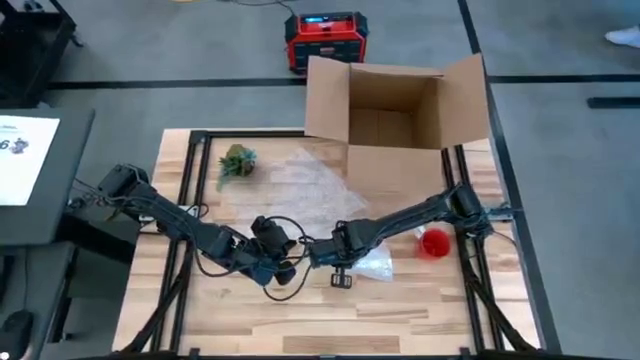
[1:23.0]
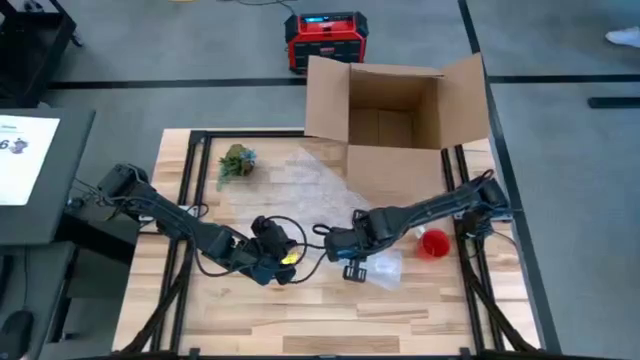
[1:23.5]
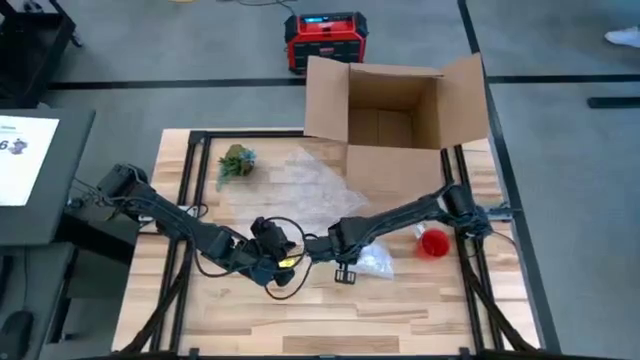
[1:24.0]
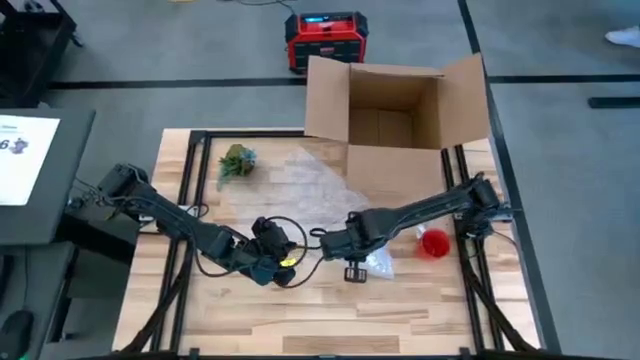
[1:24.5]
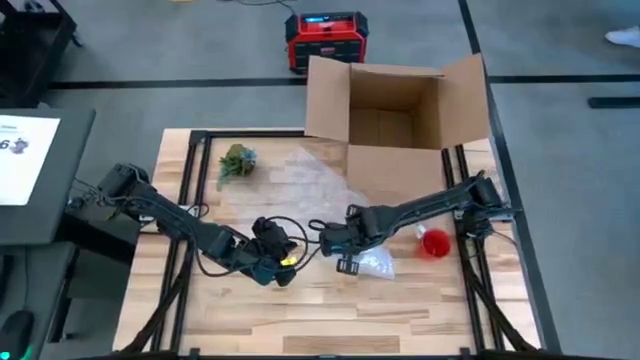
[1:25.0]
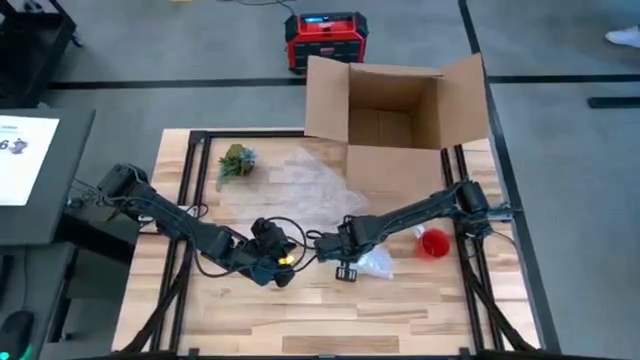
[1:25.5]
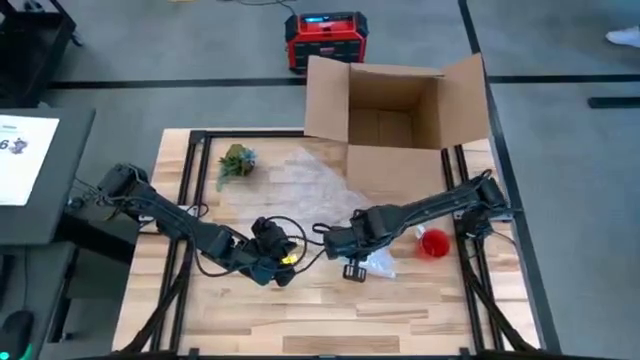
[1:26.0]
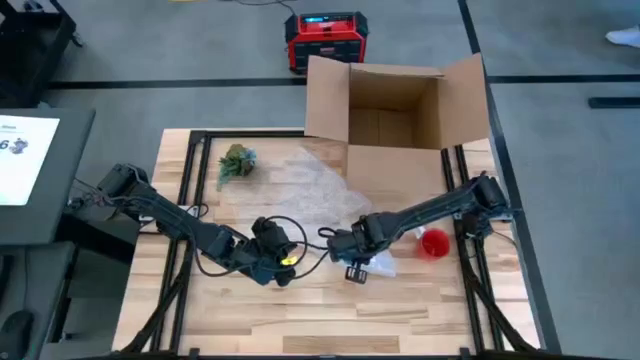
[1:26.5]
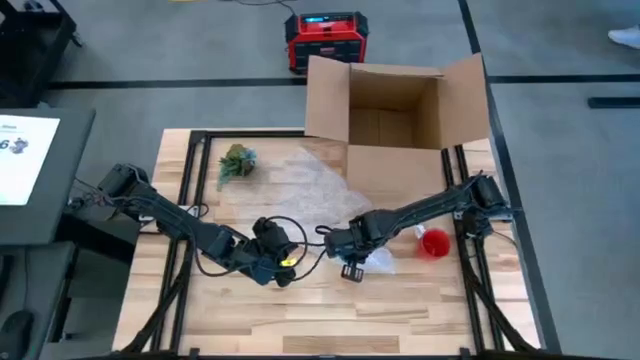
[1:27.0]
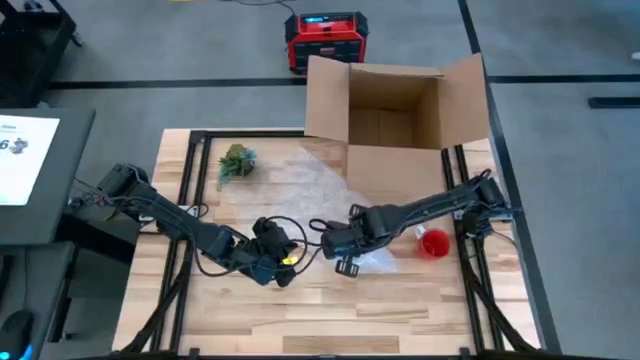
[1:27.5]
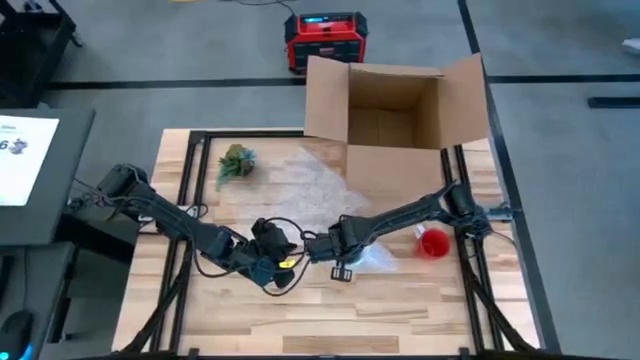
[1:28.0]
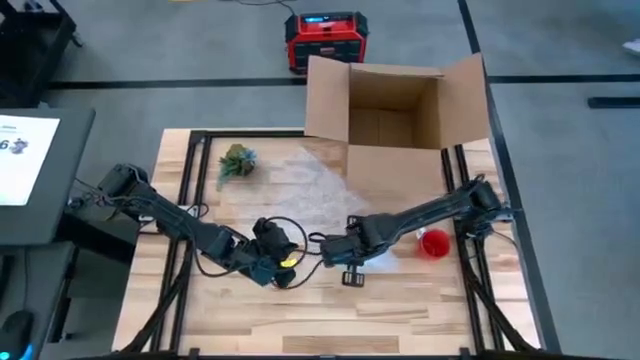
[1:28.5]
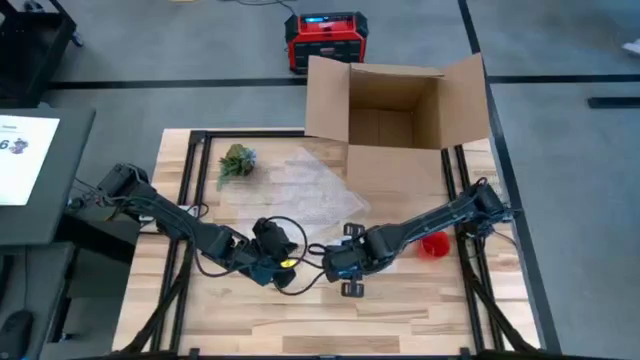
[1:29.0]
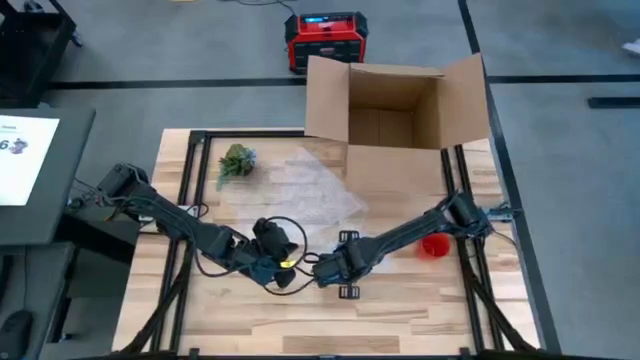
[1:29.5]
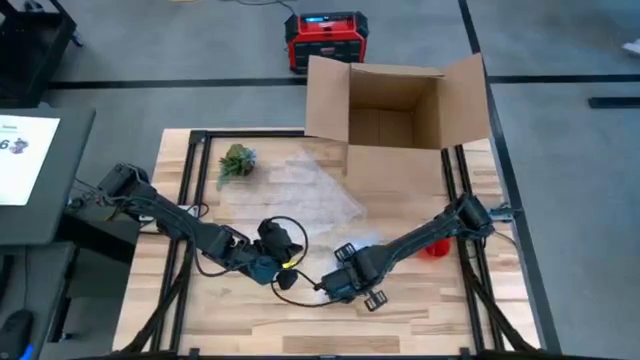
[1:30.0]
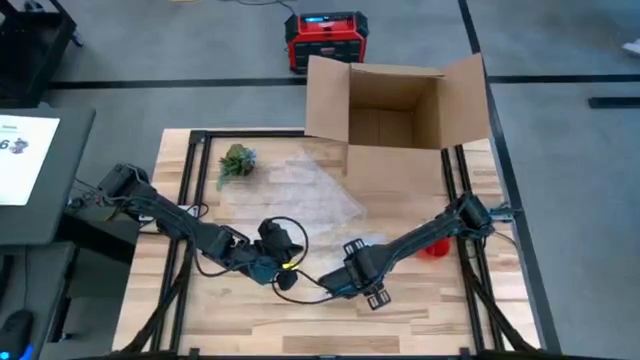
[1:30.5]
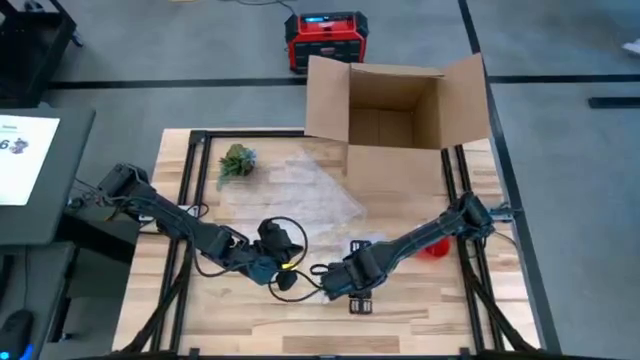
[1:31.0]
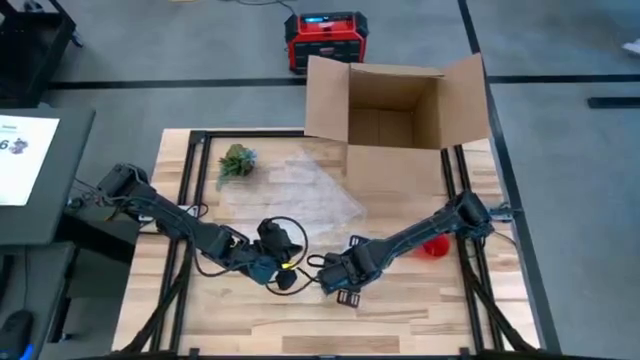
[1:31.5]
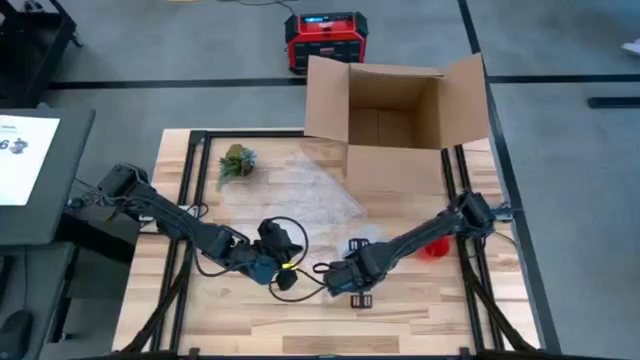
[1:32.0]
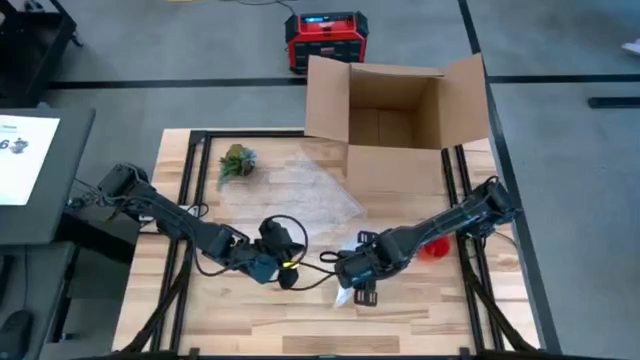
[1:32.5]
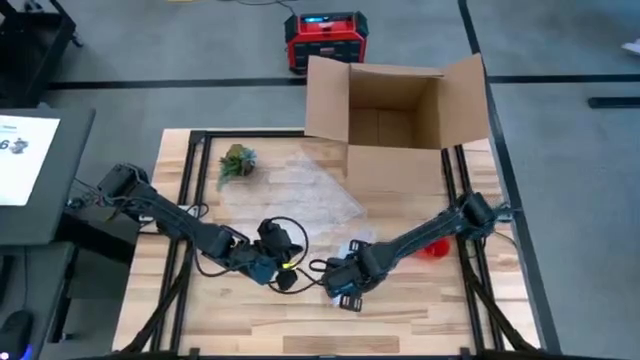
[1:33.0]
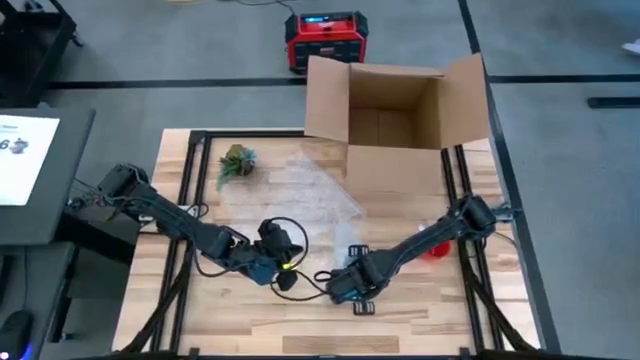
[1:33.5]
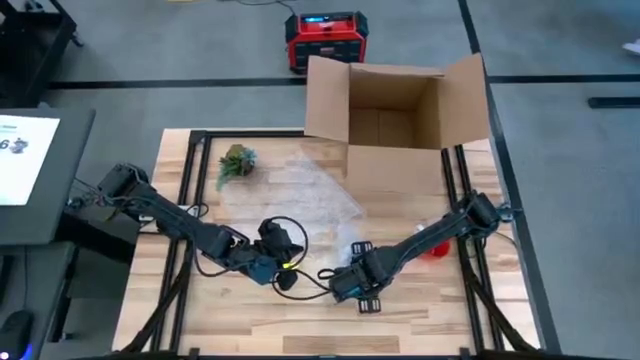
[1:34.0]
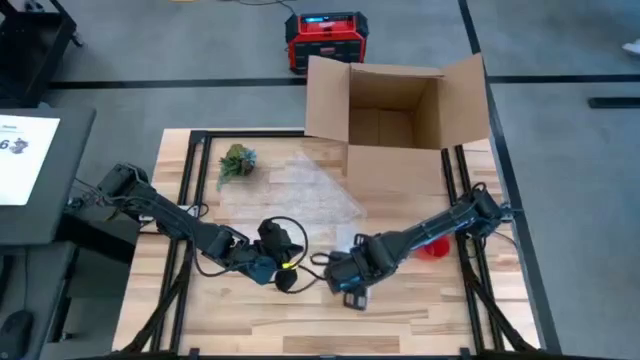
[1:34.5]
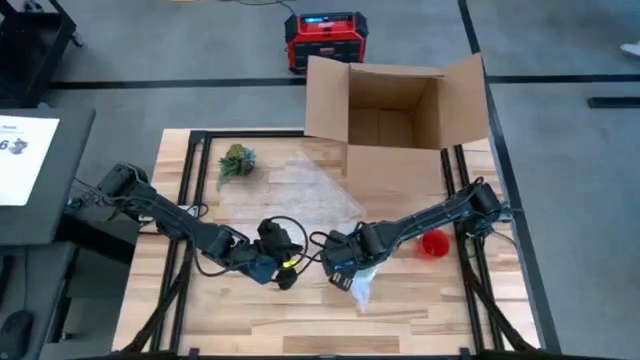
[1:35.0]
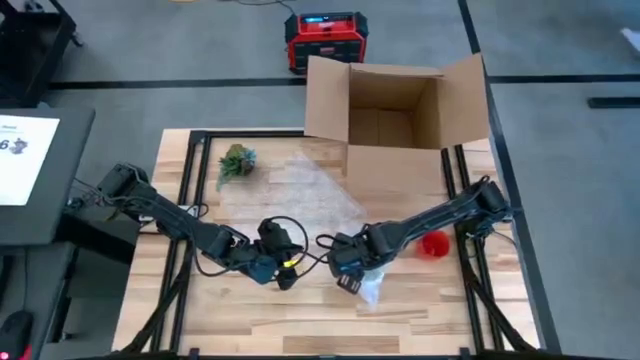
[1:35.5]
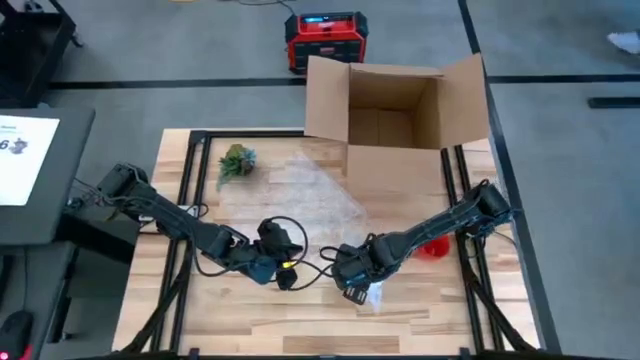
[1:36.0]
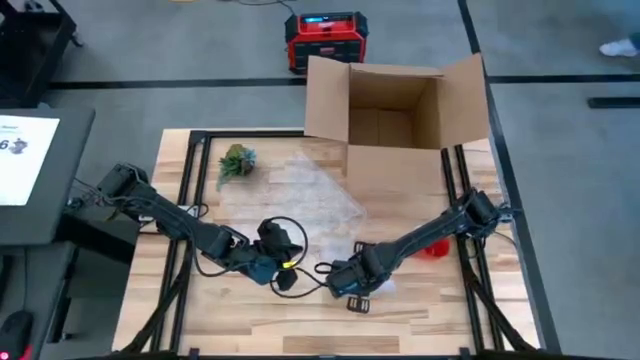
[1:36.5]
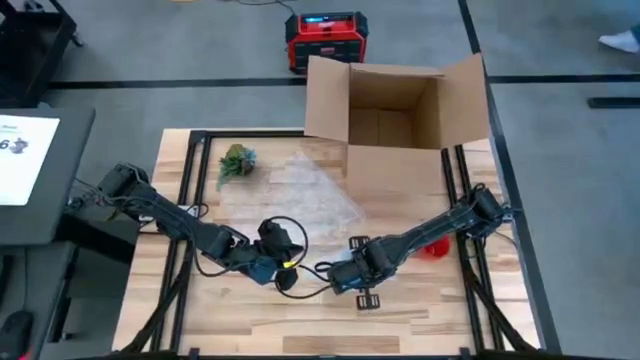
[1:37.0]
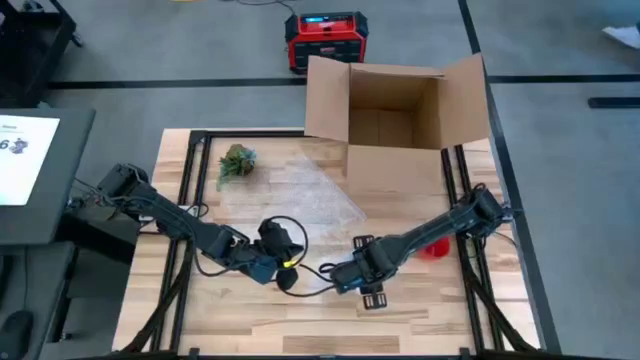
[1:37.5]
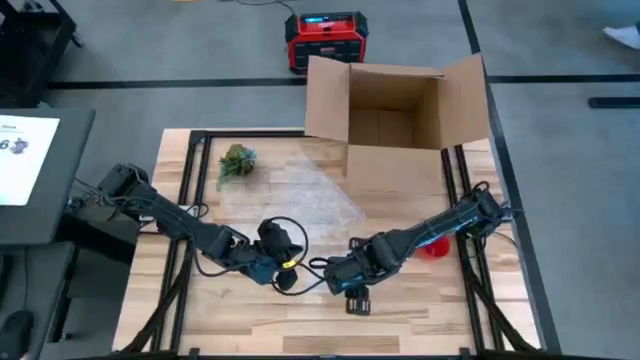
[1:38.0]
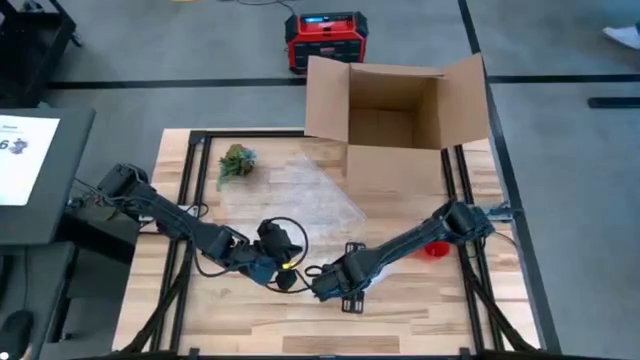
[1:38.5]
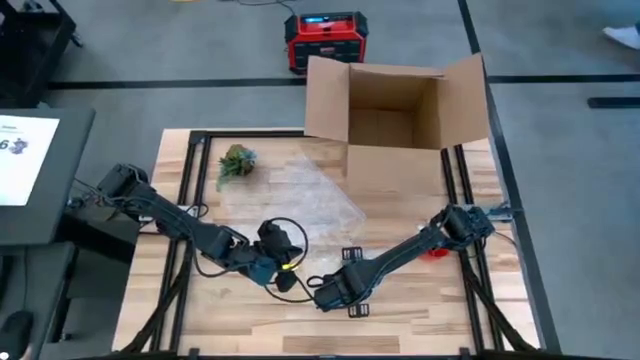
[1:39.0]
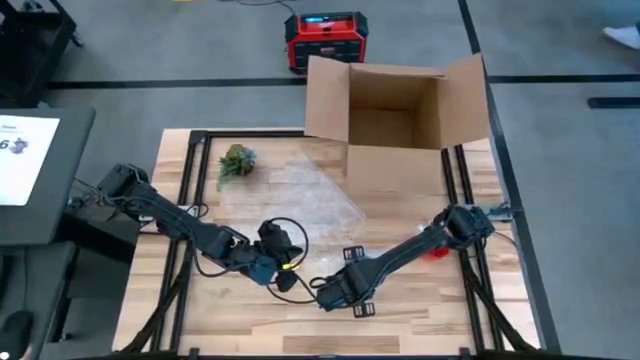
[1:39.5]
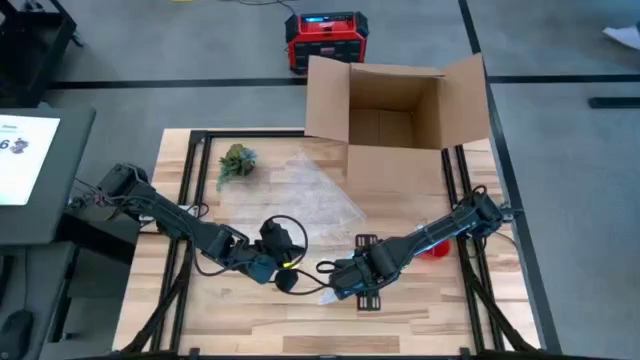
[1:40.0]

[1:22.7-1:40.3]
Task: wrap mug
Wrap the blue patterned mug with the transparent bubble wrap

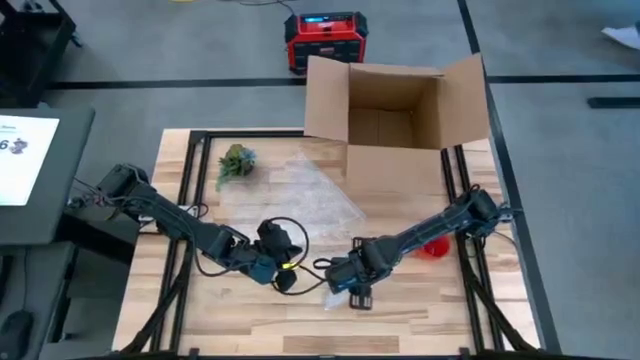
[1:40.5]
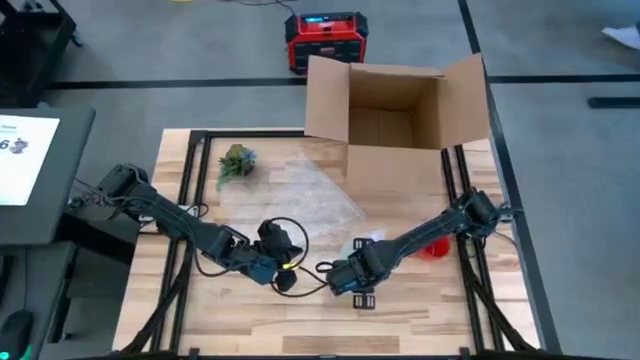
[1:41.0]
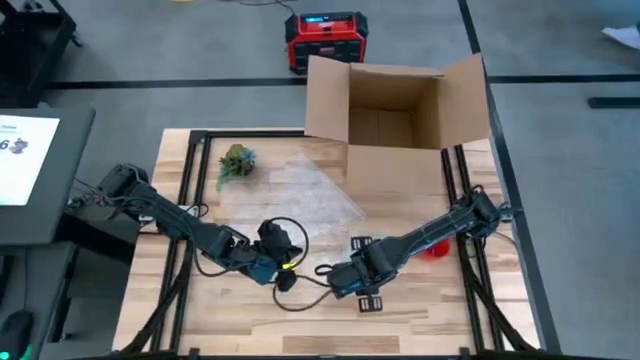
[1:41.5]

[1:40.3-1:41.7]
Wrap the blue patterned mug with the transparent bubble wrap

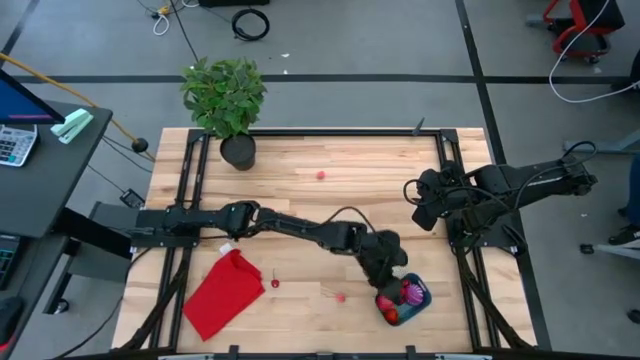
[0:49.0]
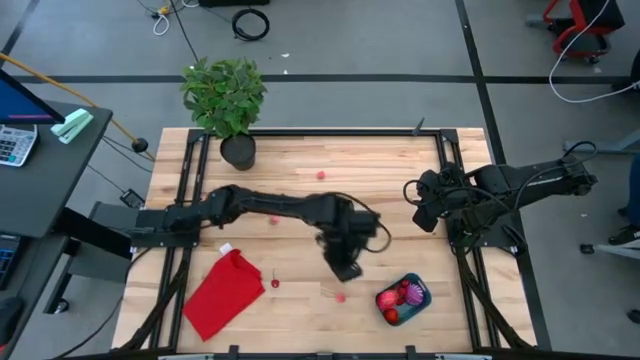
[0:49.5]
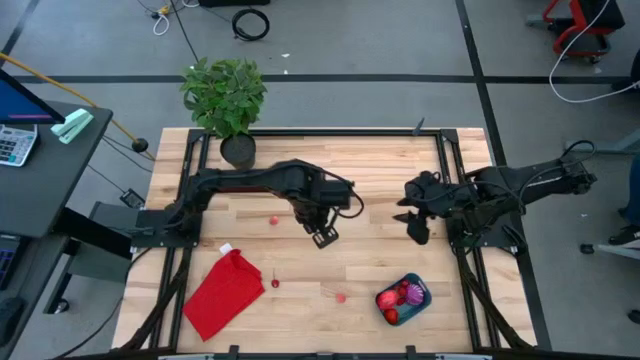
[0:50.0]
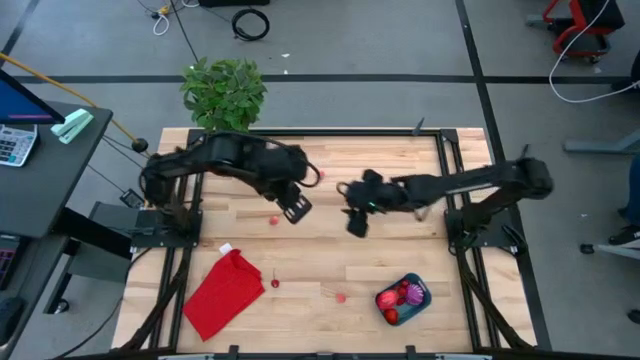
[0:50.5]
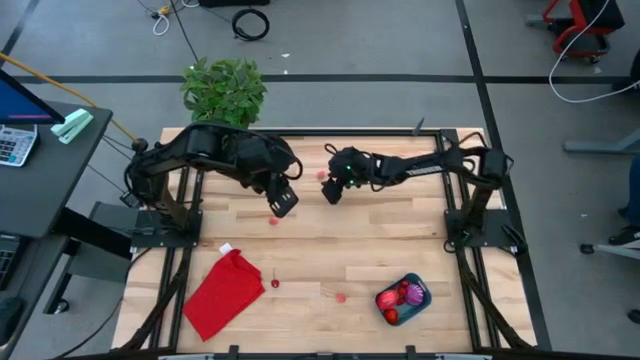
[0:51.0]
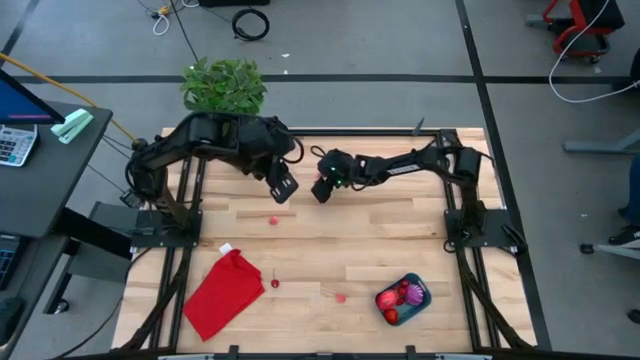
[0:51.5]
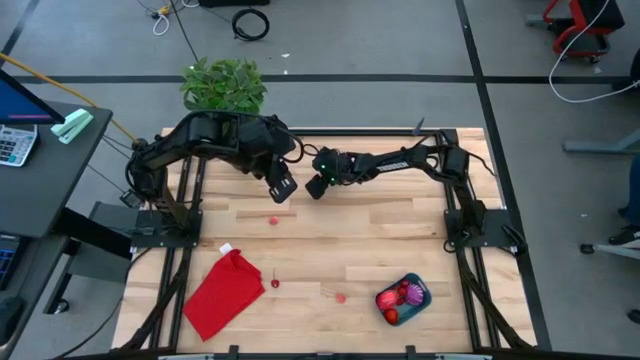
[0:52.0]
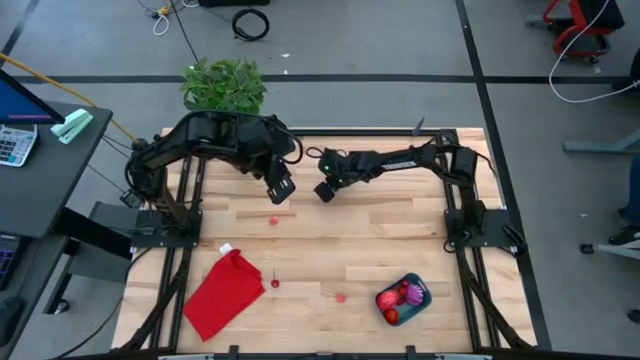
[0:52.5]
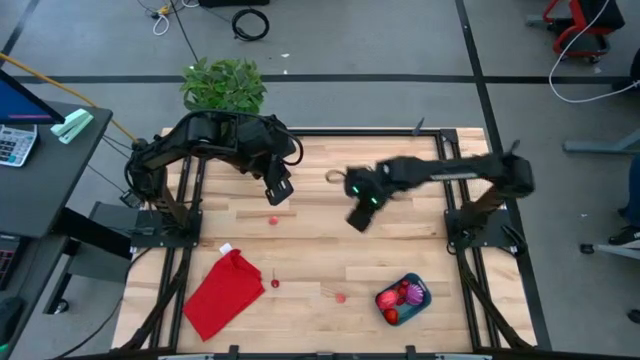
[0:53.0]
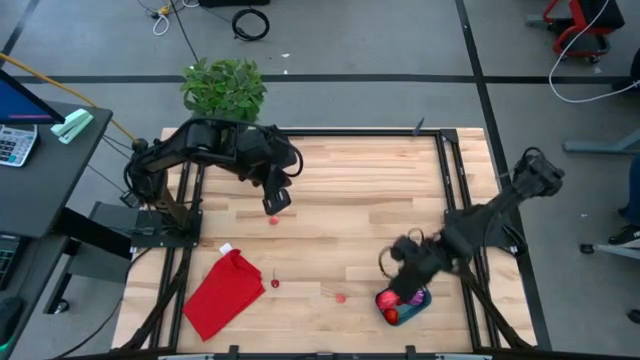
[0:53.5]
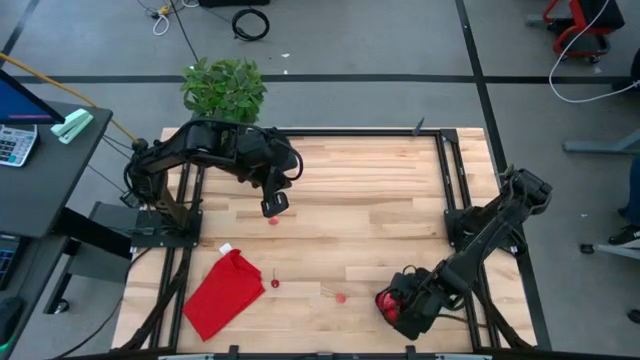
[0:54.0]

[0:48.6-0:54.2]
Task: Pick and placing Produce into tupperware
Put the top peach into the bin
